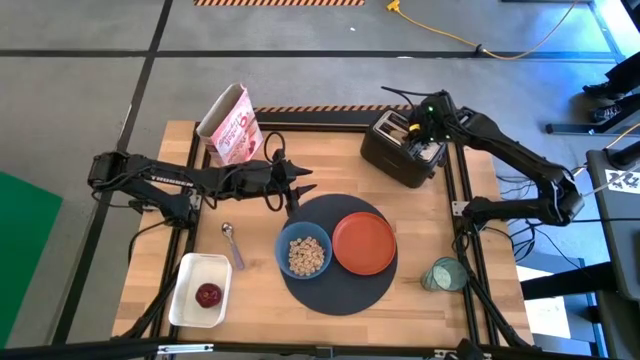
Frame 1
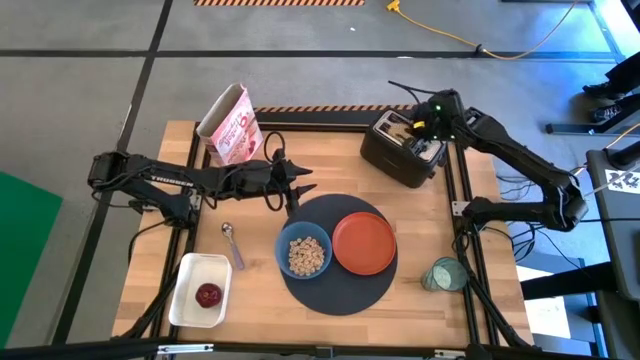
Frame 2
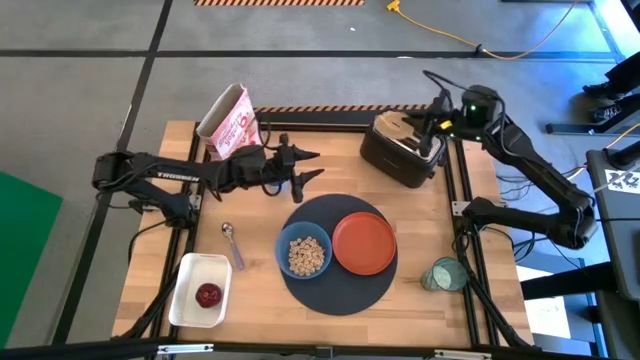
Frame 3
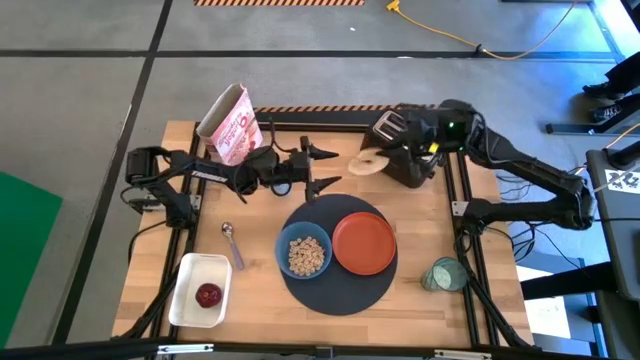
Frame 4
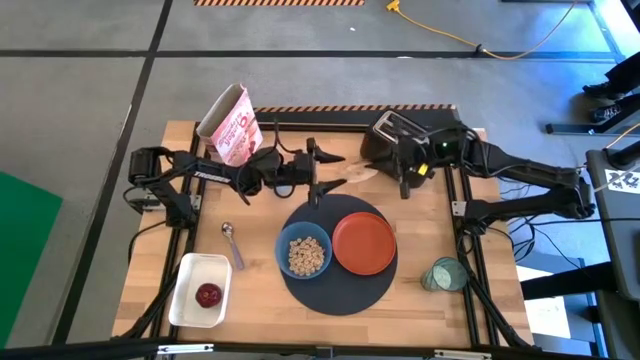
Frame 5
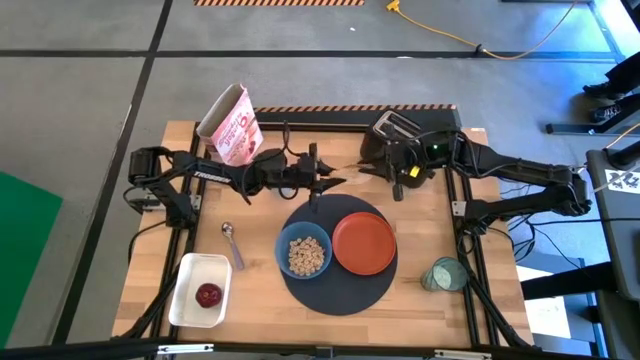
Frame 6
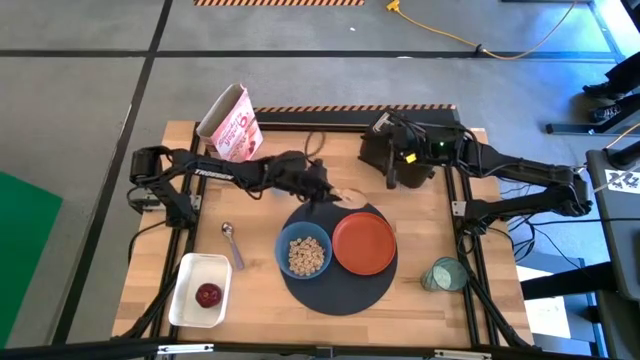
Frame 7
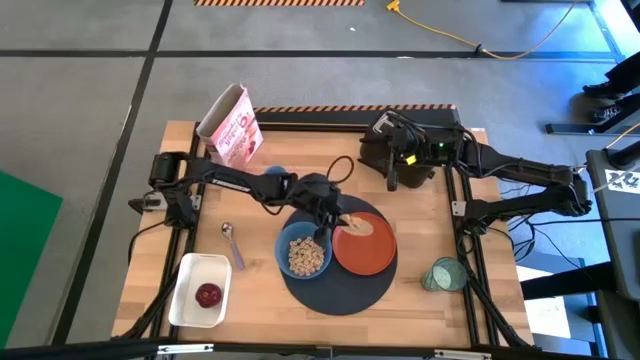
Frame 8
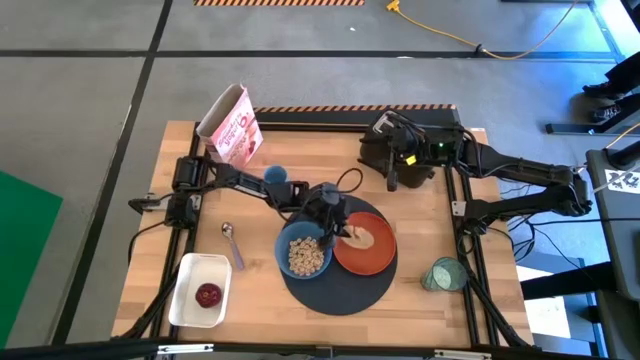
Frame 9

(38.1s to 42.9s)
Task: Arrange a breakfast setting
Put the bagel on the orange plate

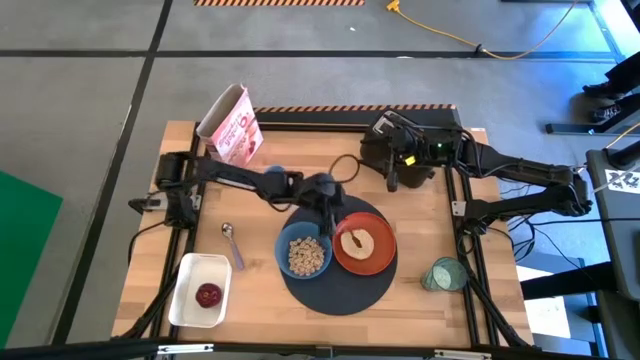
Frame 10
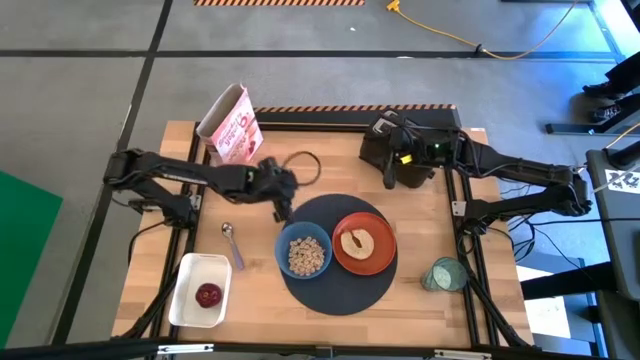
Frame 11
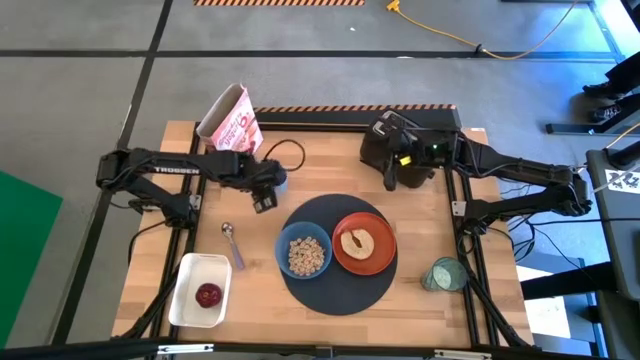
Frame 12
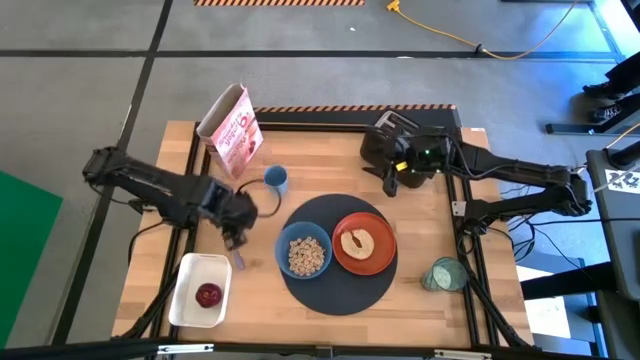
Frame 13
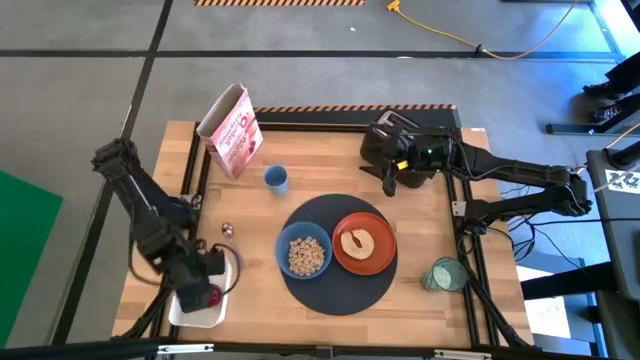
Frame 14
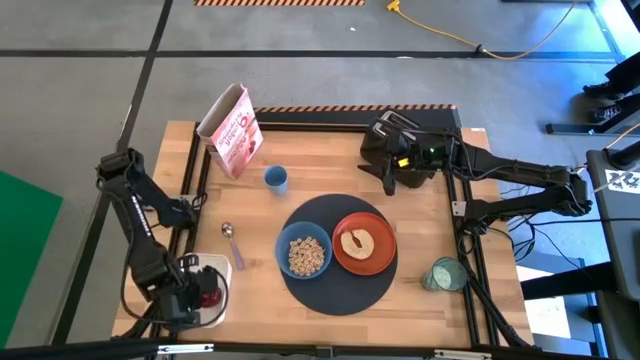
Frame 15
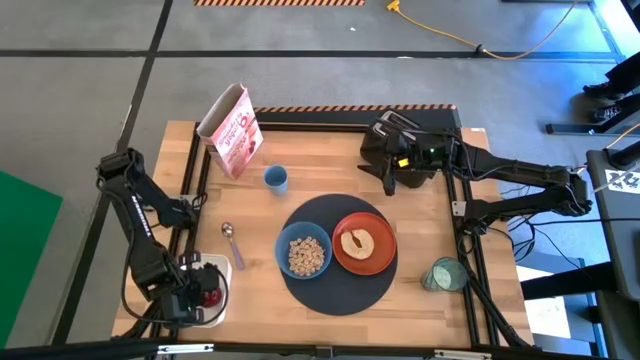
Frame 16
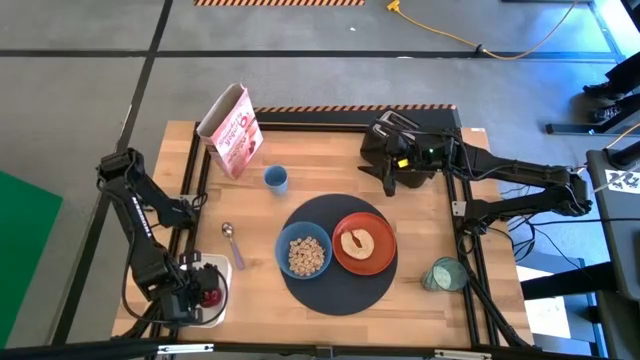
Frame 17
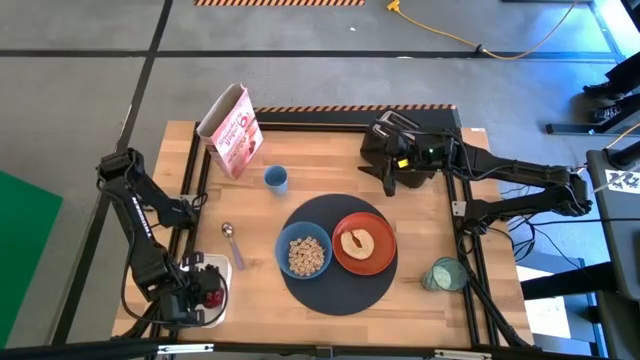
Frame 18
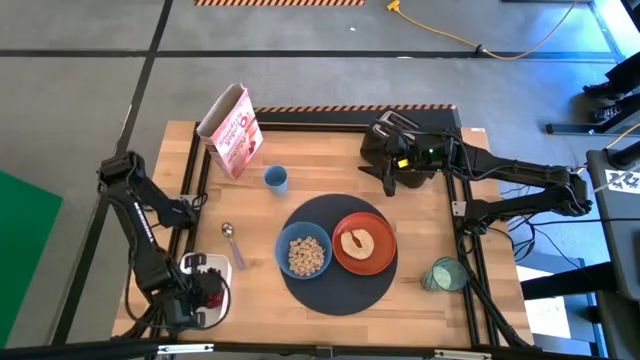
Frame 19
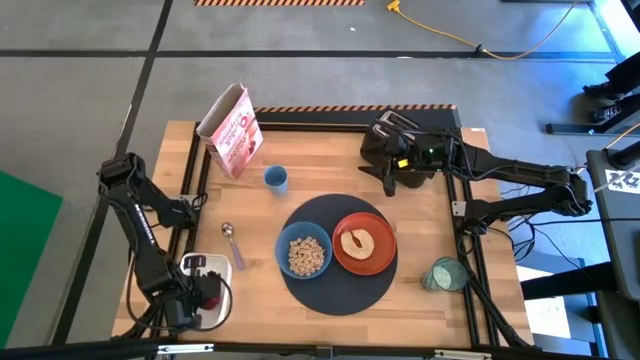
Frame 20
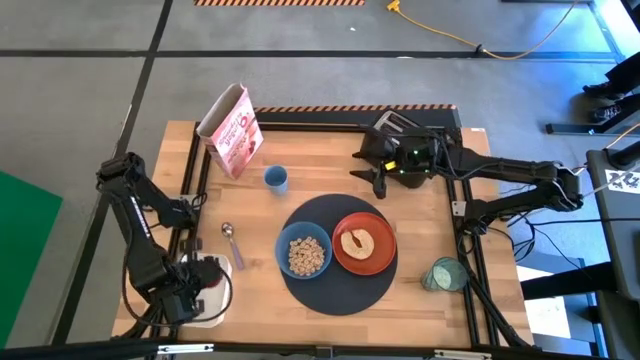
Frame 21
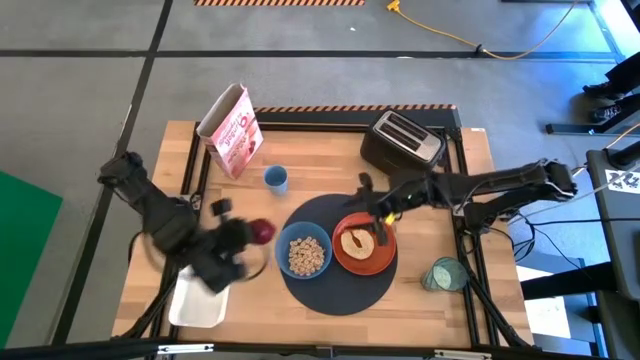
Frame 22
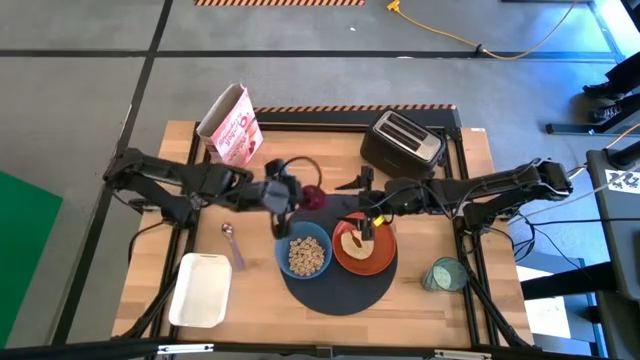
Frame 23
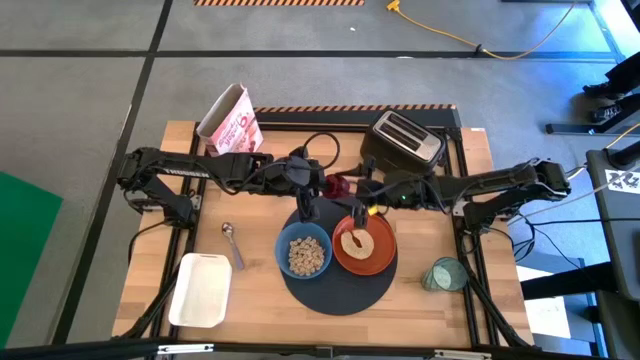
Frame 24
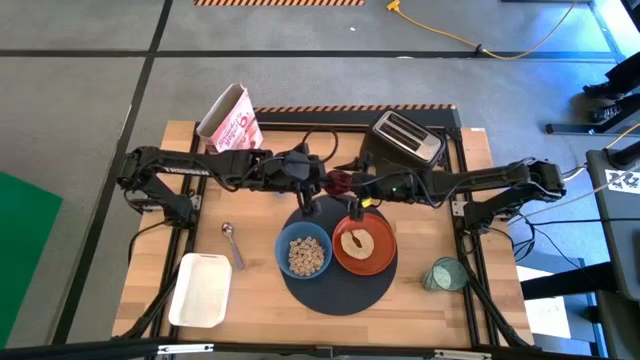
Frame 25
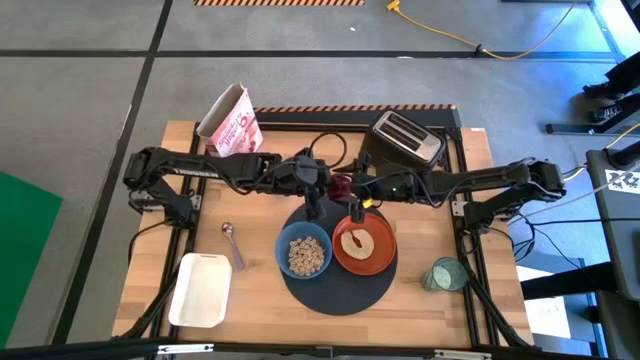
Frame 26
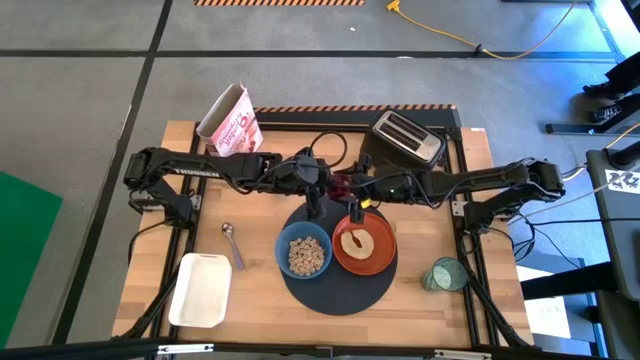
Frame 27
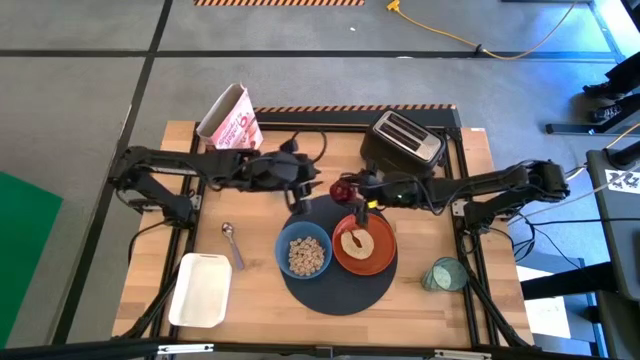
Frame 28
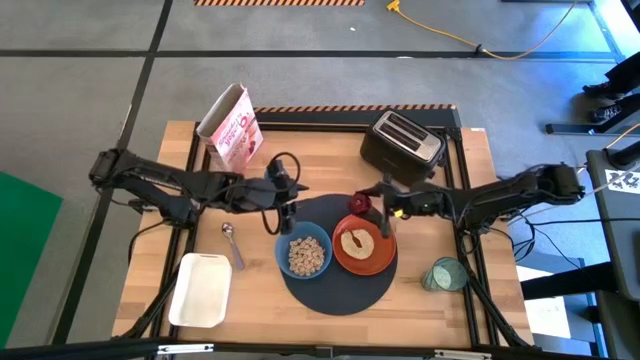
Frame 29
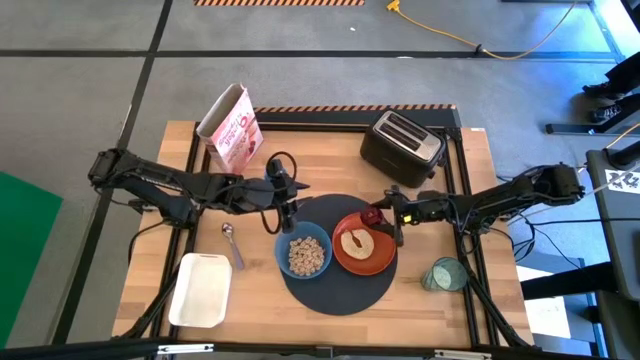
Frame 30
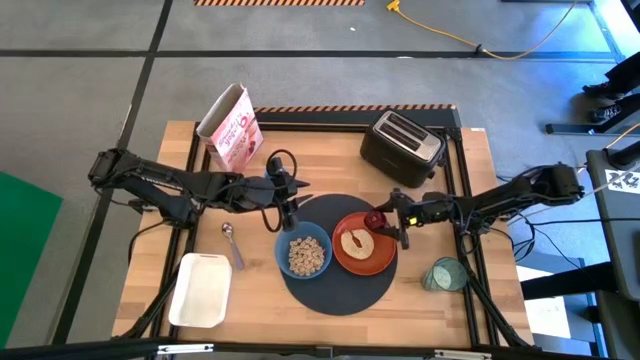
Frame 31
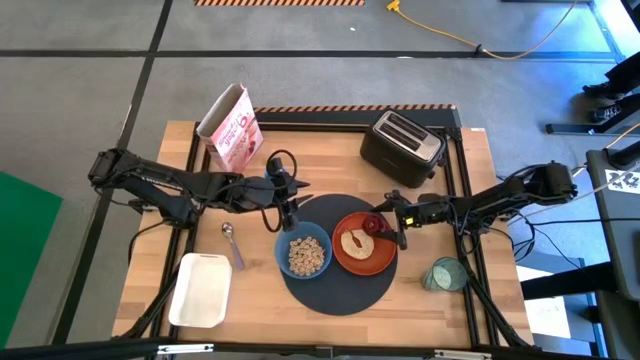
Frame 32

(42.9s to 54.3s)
Put the apple on the orange plate

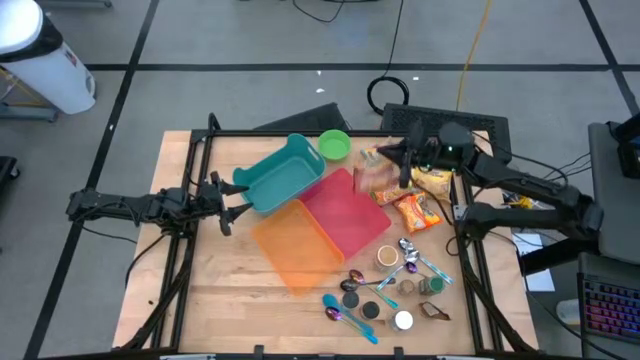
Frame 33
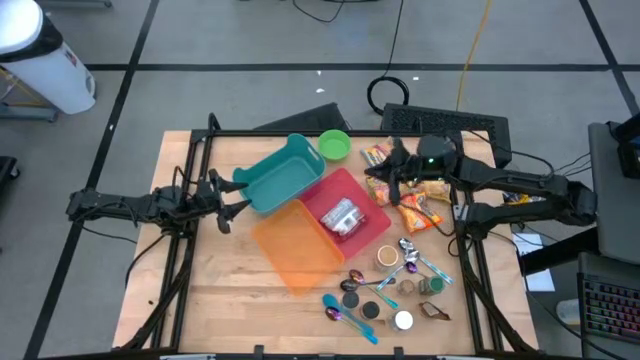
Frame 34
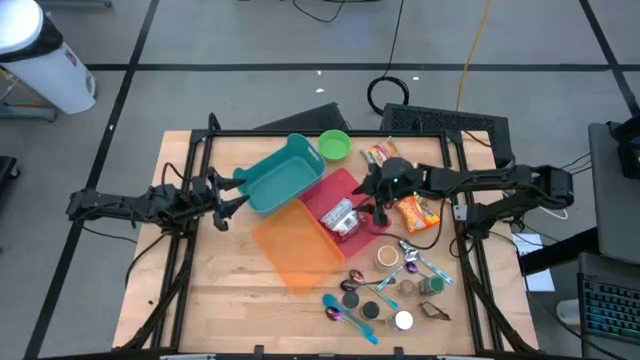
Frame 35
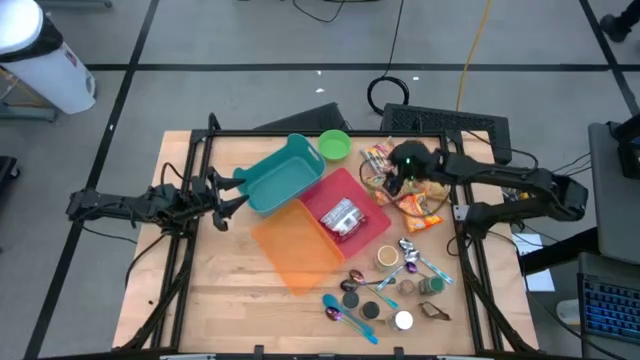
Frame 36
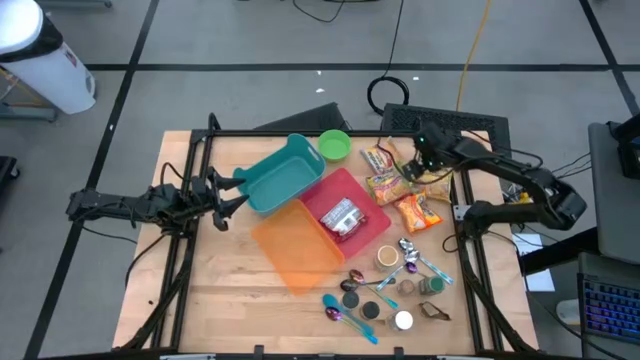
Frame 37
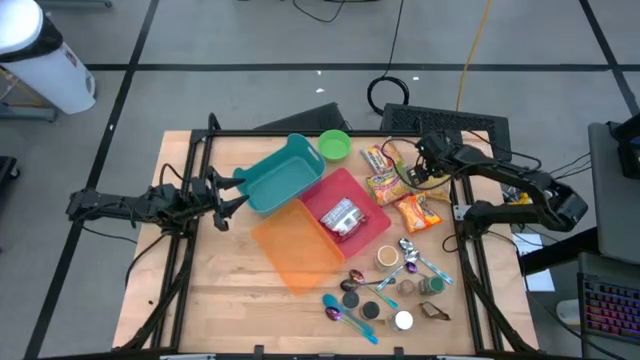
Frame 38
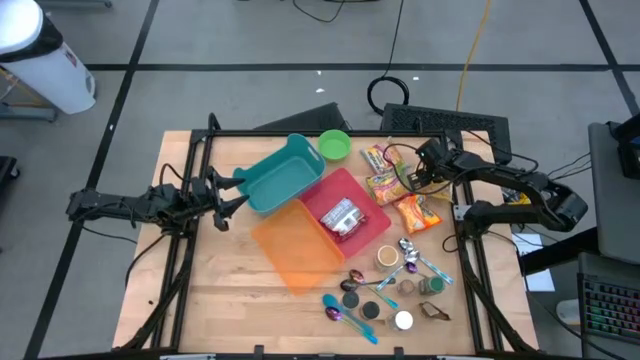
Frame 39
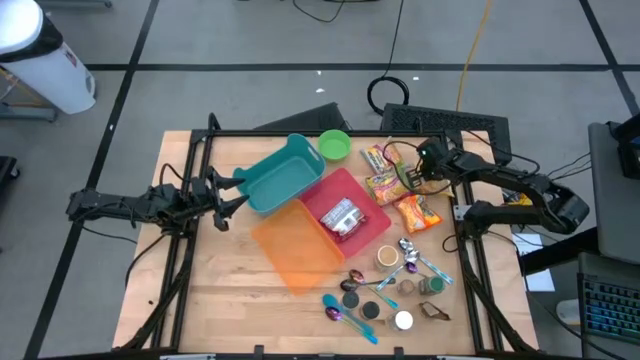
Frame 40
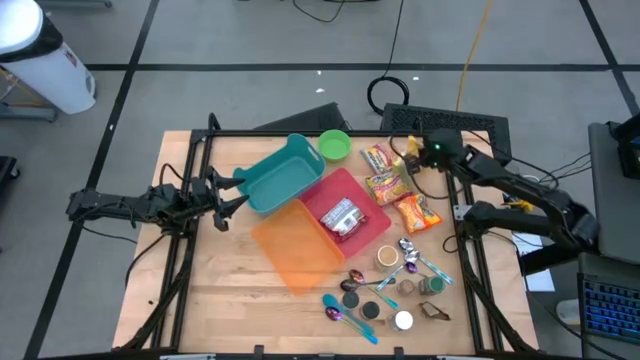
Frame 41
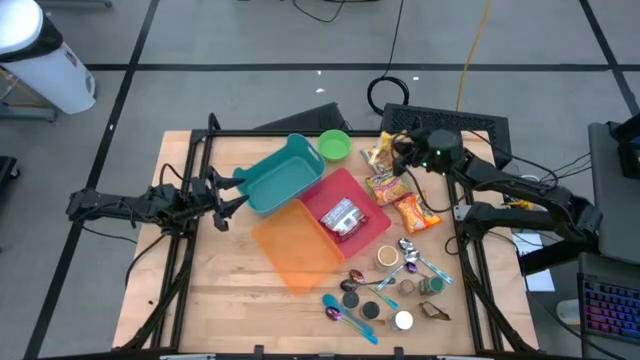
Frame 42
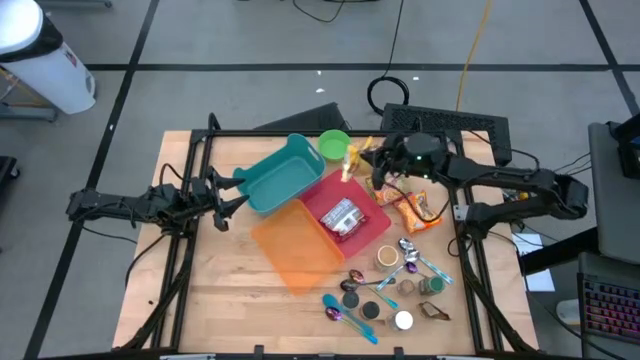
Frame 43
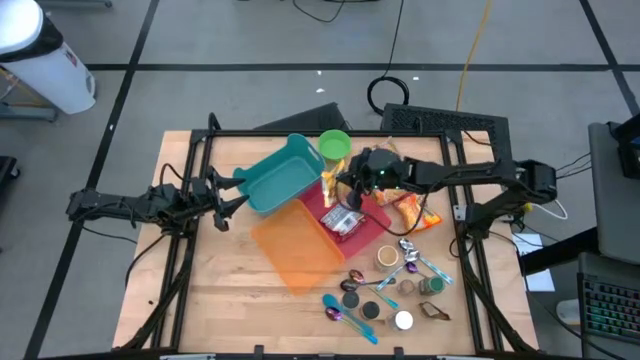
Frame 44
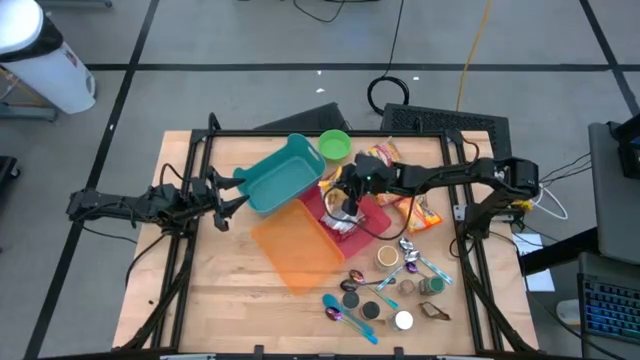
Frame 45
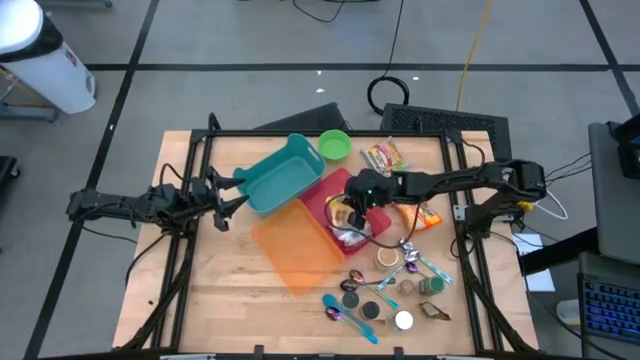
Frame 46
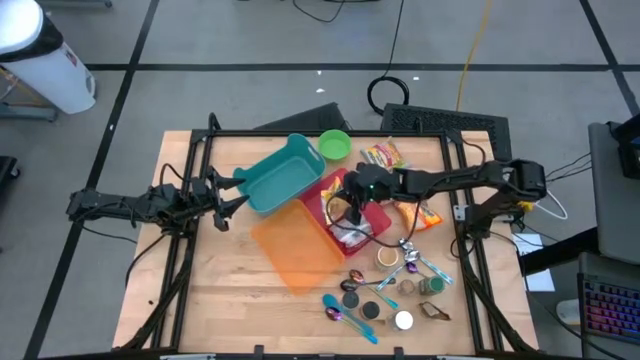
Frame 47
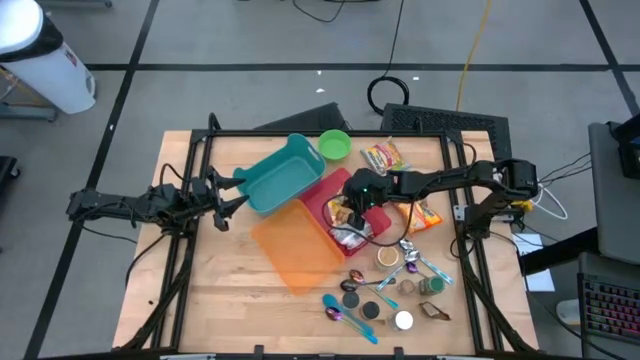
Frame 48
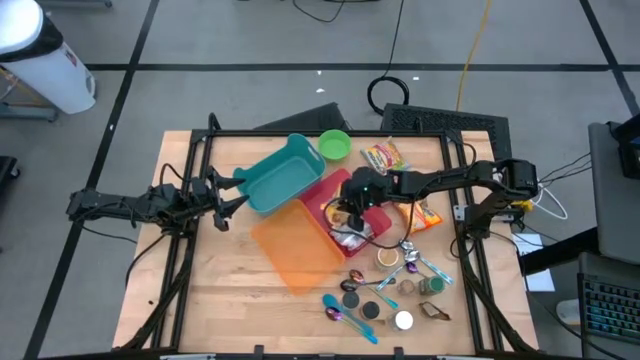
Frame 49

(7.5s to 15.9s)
Task: Pick & Place Food Item
Put the yellow noodle pack into the red bin
